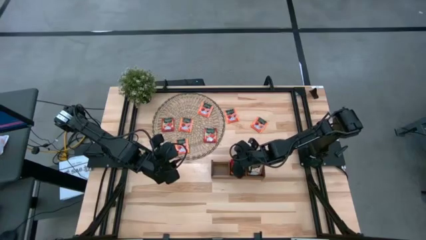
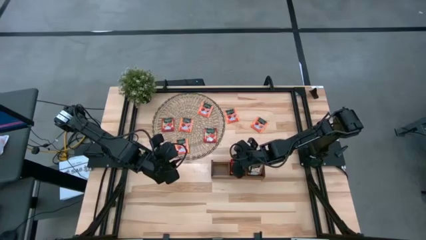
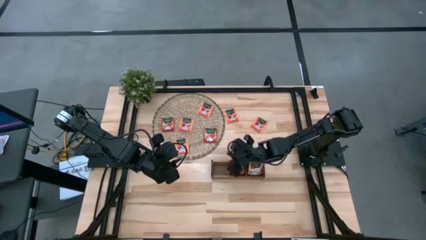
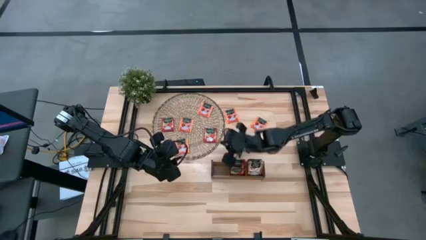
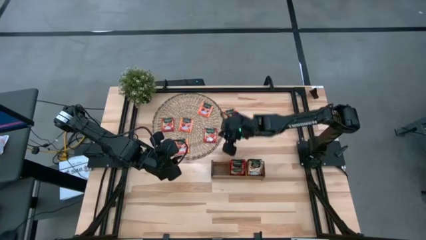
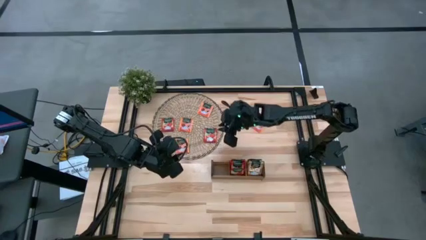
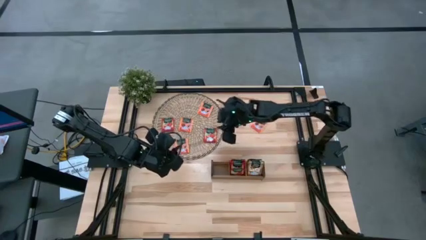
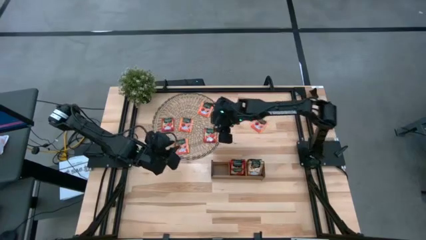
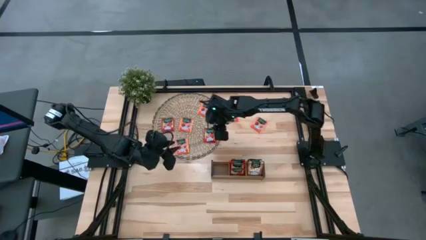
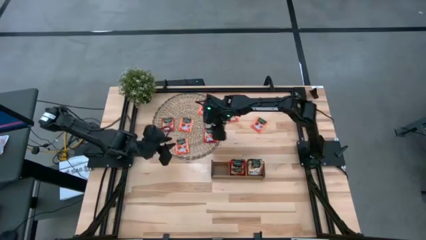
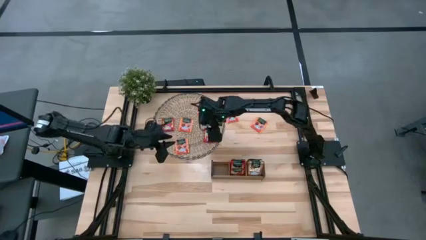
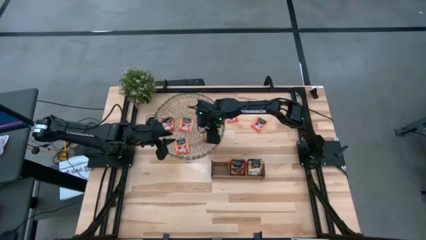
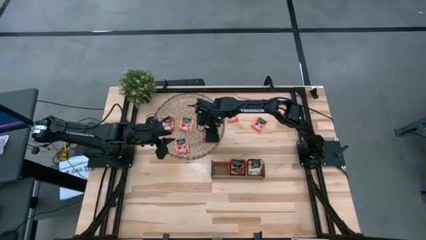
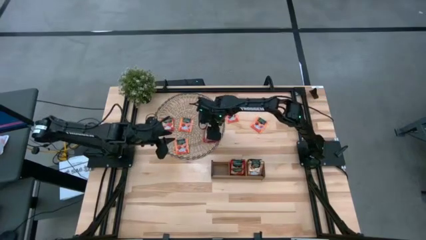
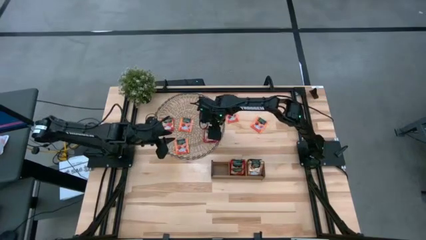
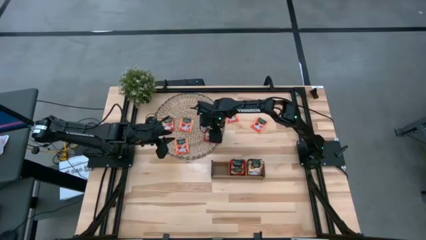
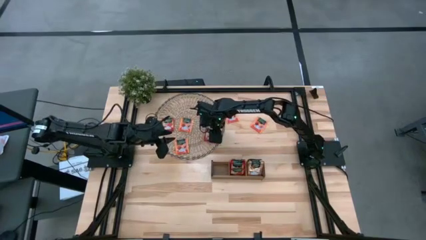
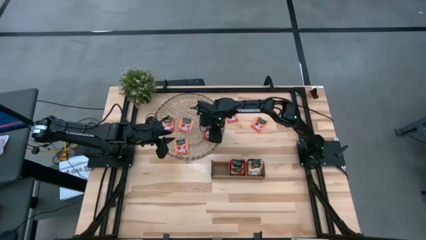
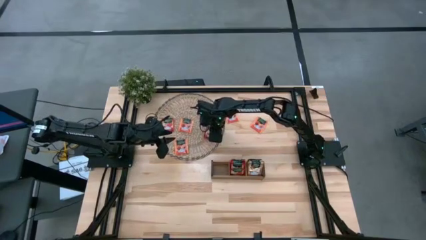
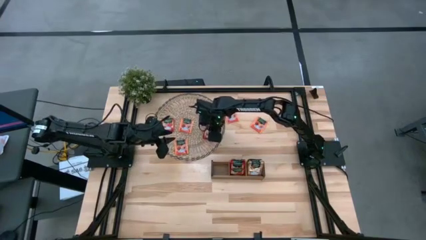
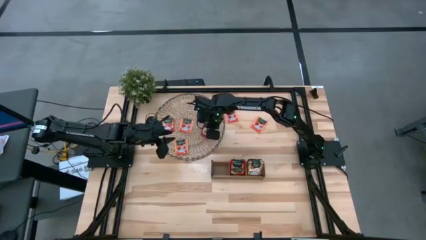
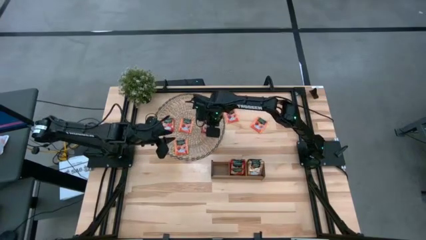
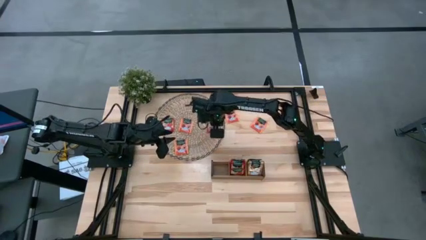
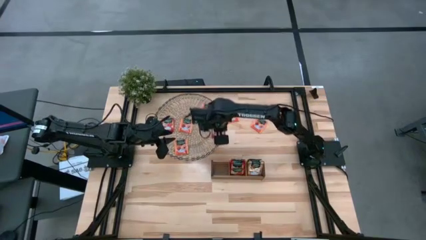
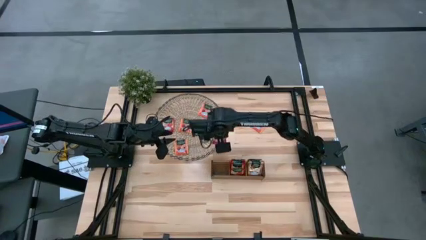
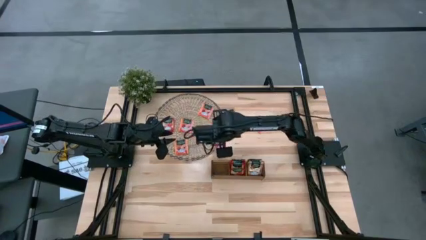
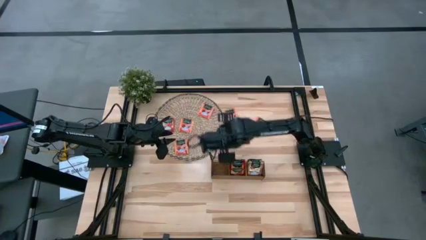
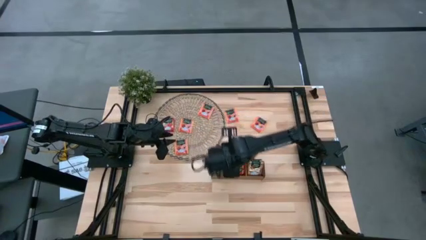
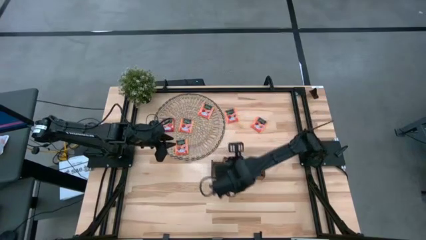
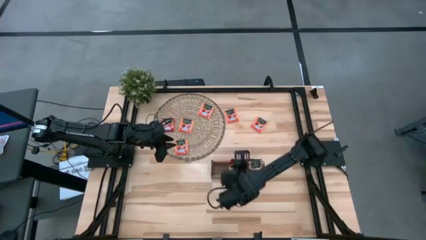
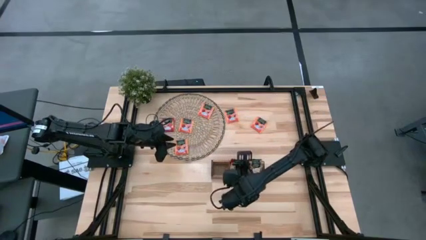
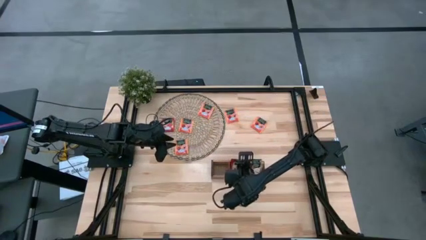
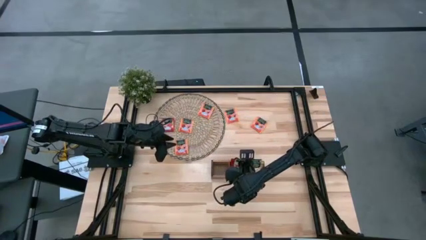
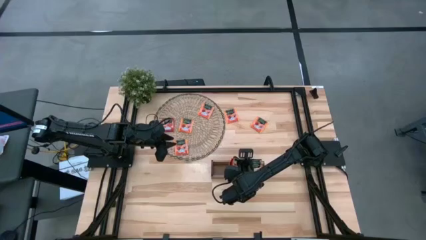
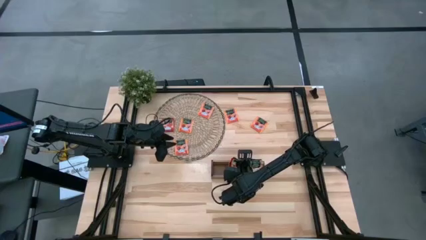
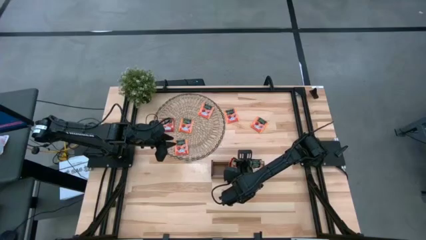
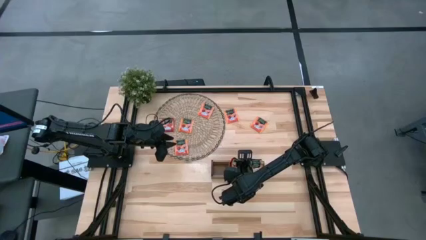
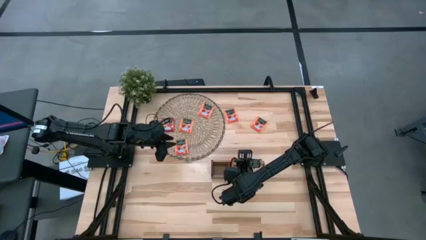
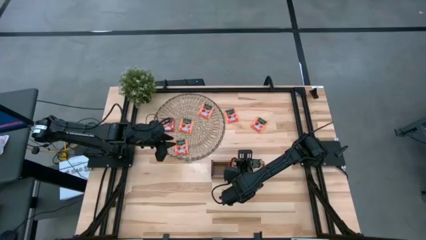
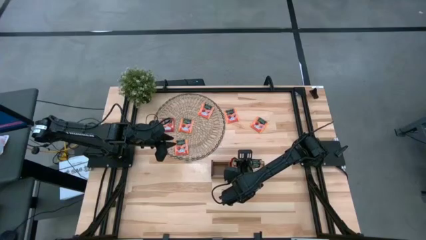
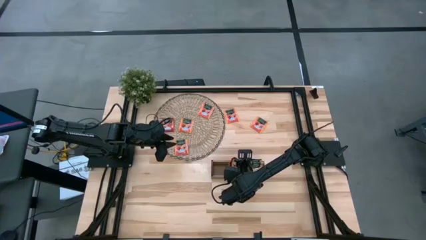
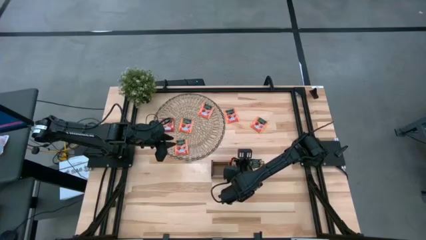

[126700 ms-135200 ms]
Task: Pick & Place Tea
Put the right red tea bag into the middle slot of the wooden organizer

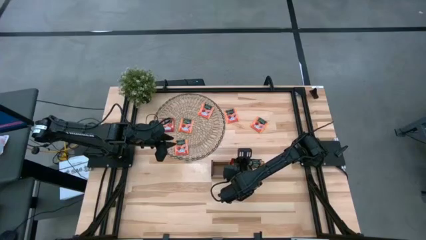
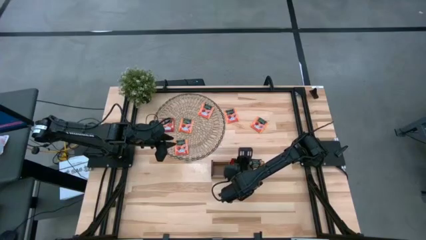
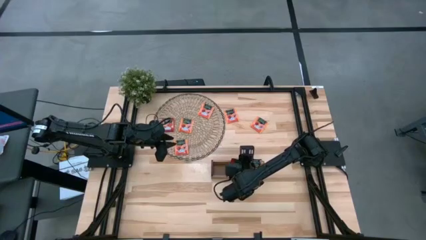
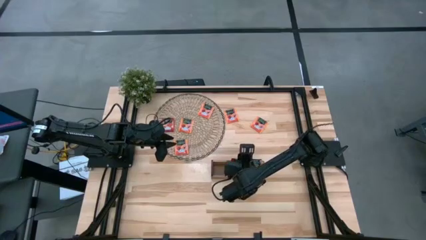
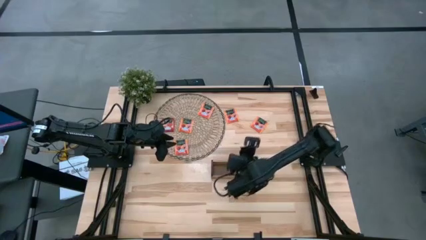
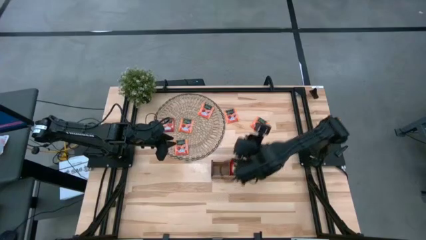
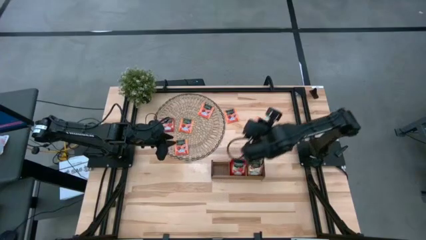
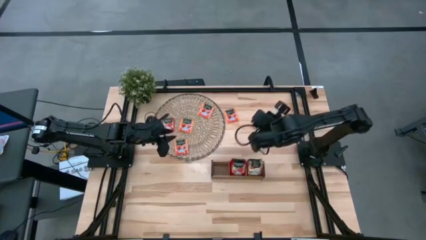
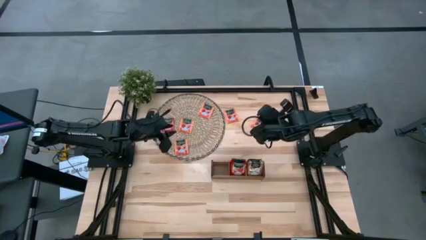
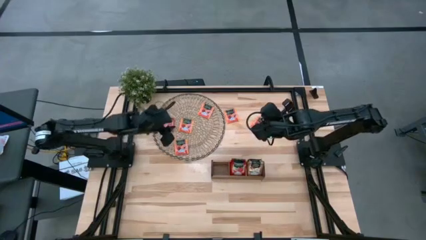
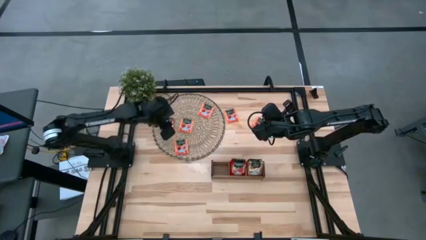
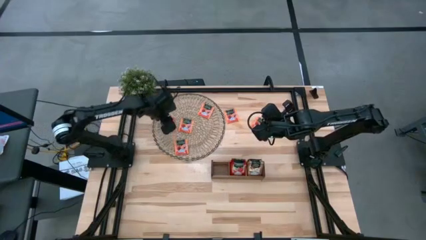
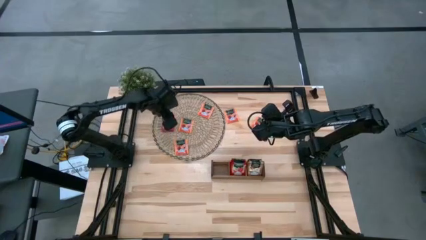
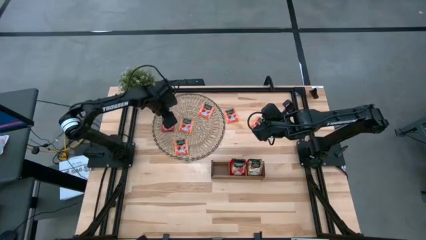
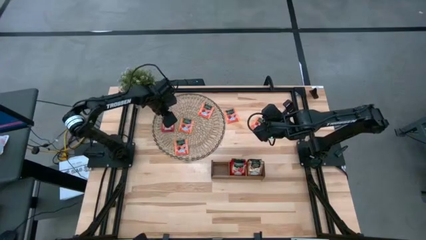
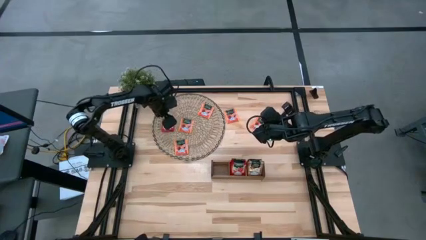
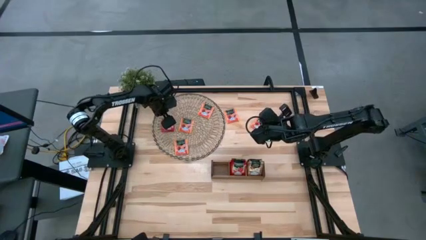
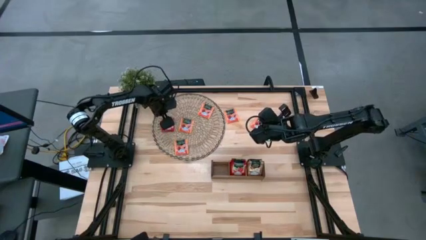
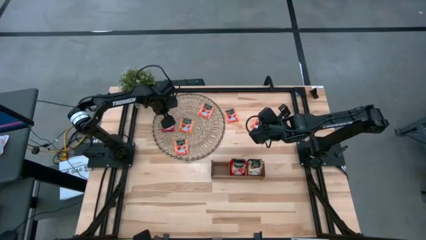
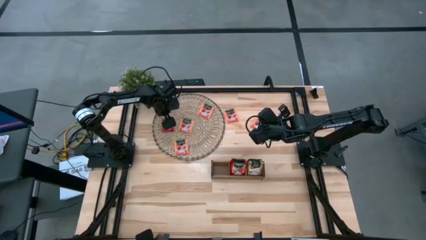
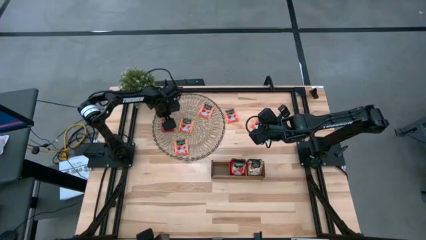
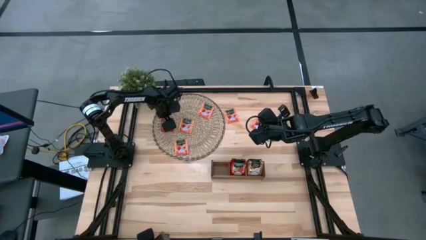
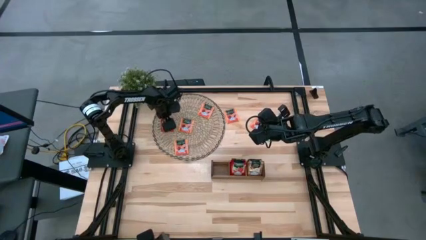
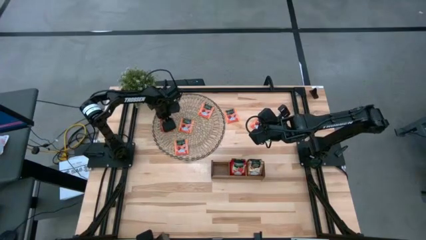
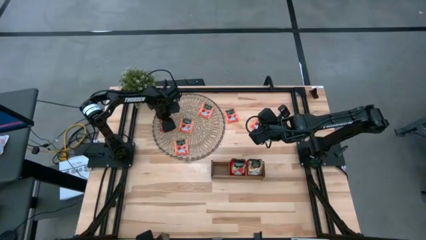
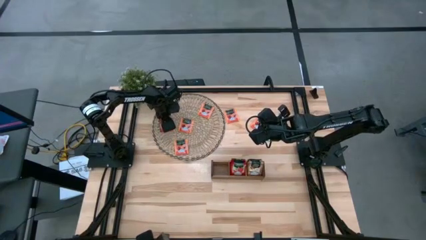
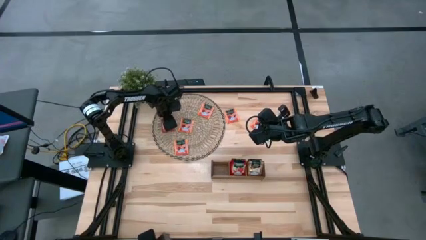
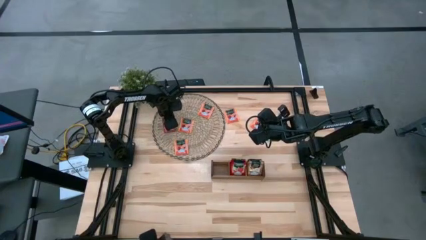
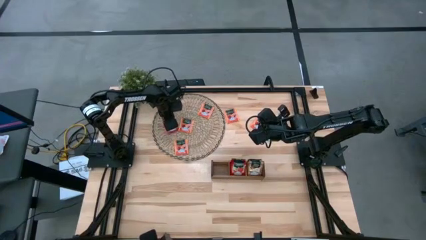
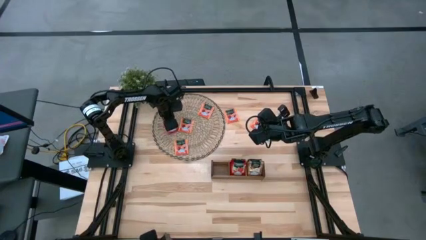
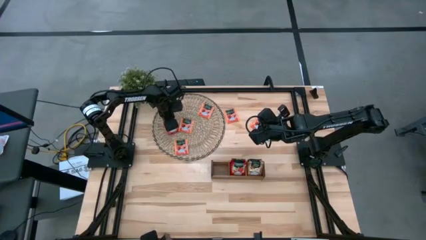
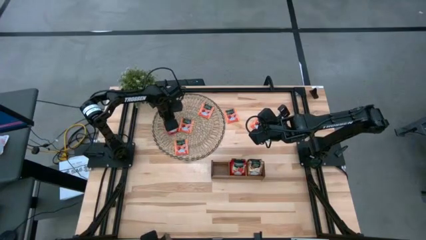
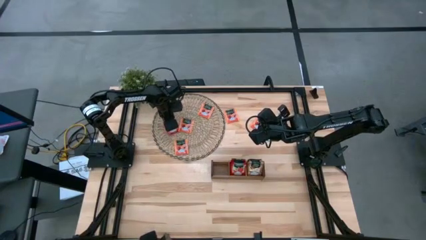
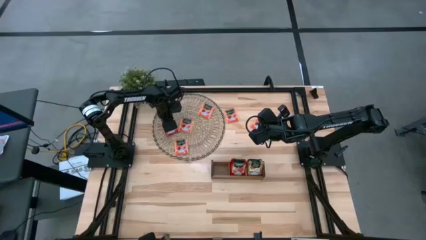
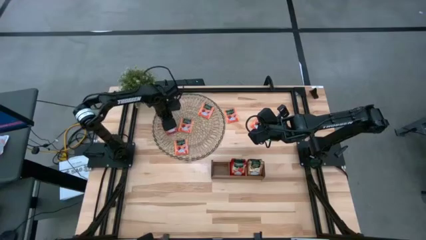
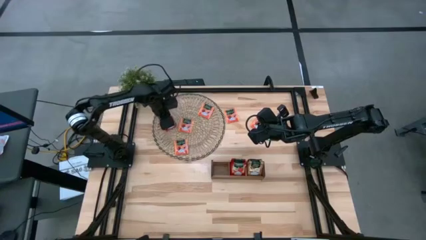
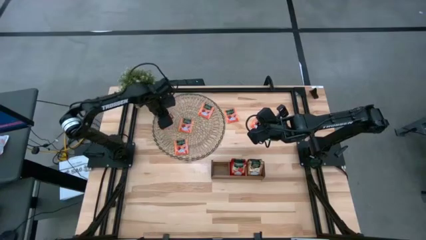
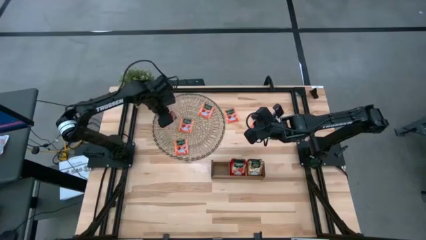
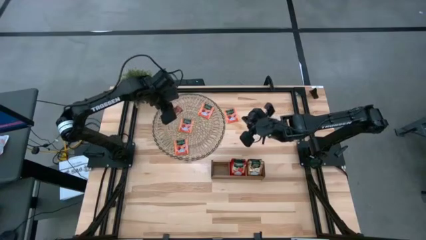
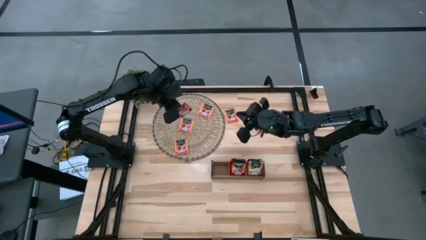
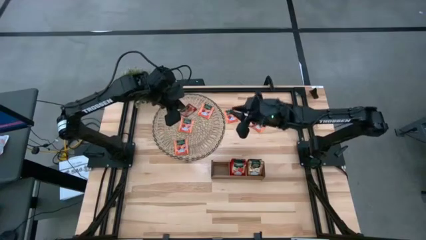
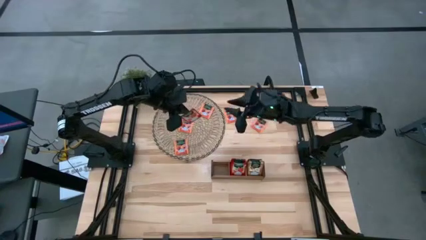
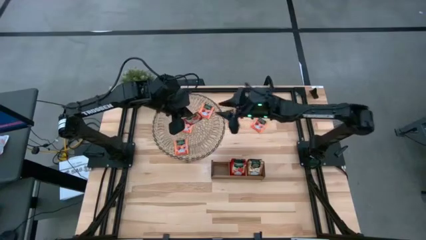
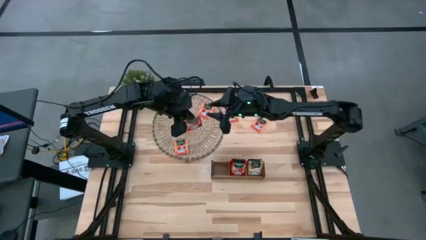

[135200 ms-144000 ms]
Put the red tea bag into the middle slot of the wooden organizer
